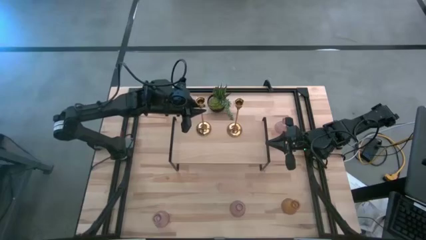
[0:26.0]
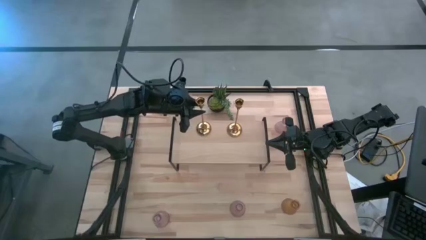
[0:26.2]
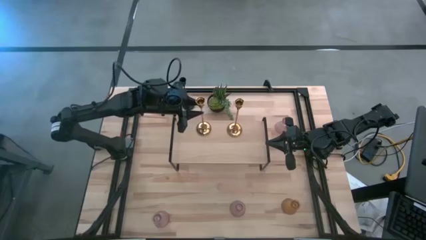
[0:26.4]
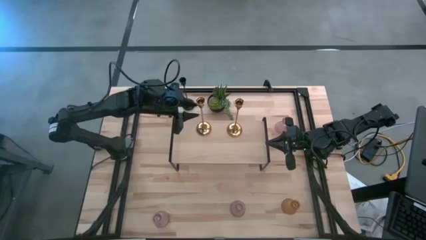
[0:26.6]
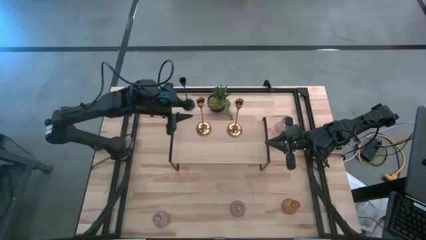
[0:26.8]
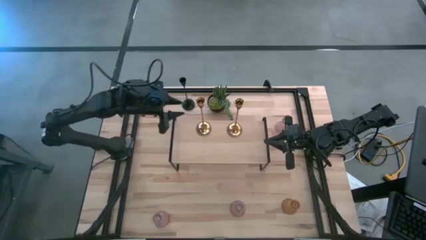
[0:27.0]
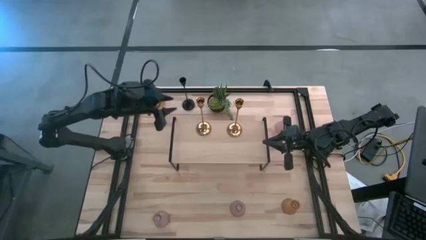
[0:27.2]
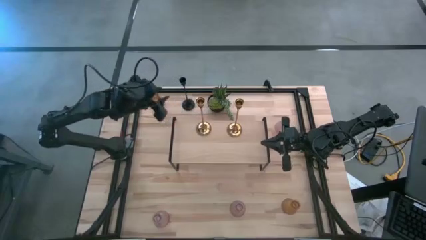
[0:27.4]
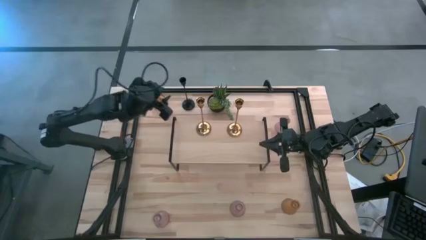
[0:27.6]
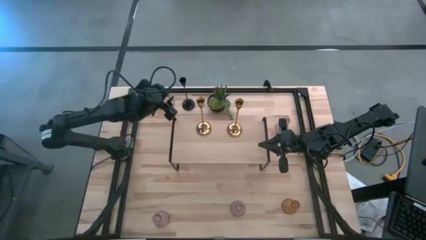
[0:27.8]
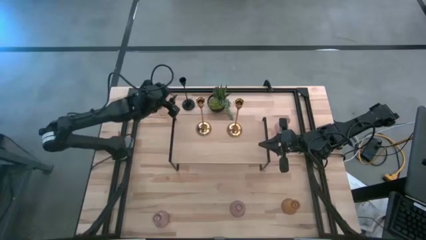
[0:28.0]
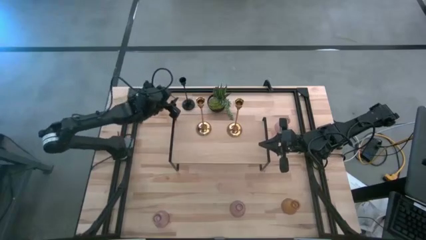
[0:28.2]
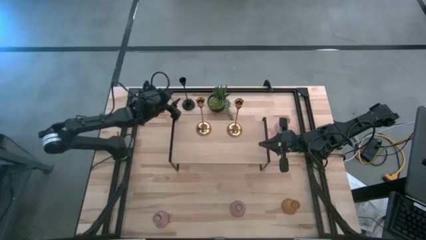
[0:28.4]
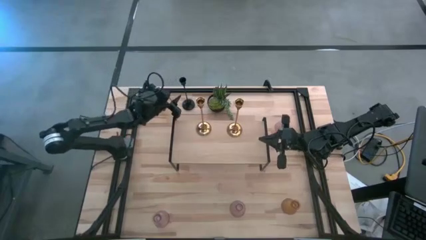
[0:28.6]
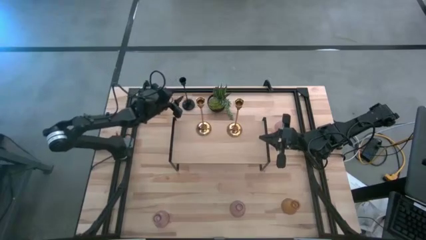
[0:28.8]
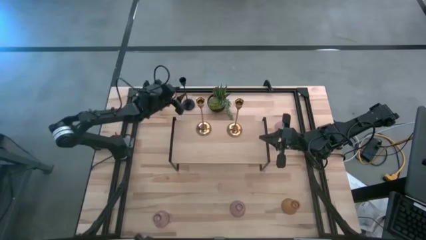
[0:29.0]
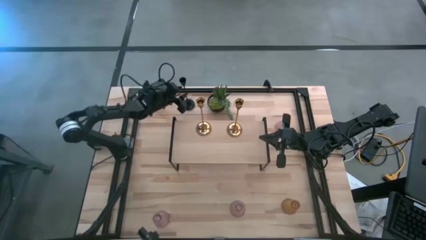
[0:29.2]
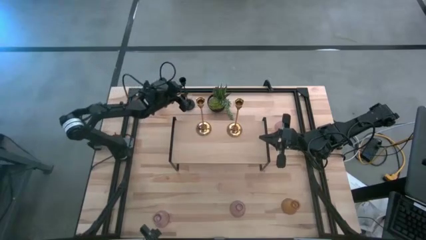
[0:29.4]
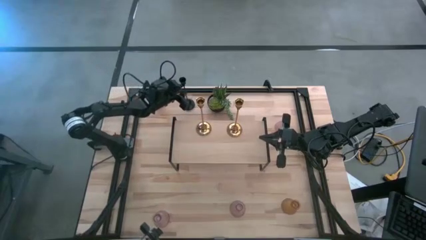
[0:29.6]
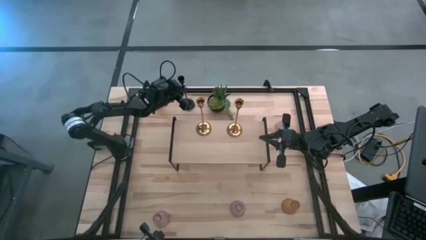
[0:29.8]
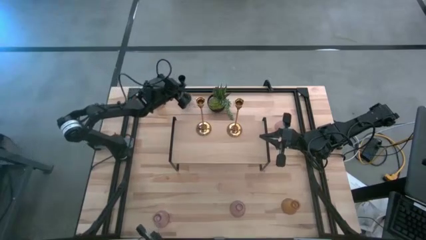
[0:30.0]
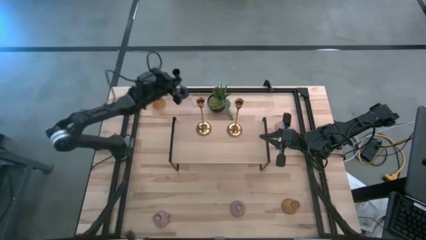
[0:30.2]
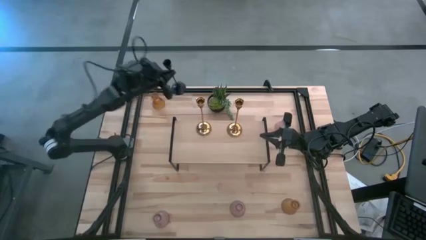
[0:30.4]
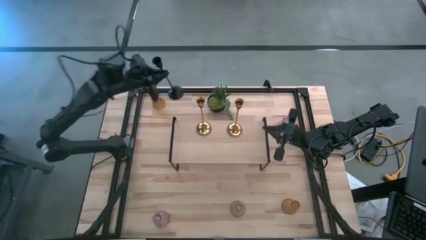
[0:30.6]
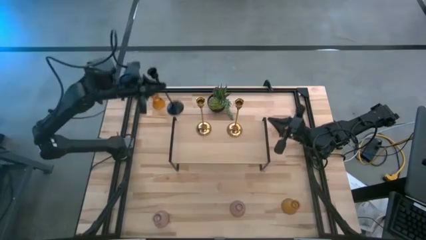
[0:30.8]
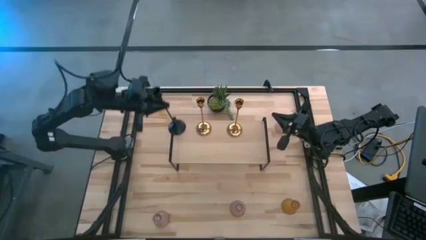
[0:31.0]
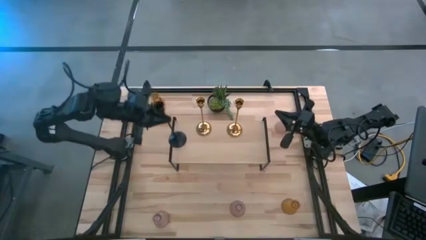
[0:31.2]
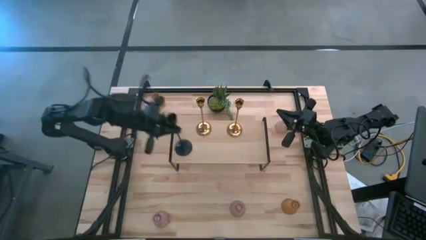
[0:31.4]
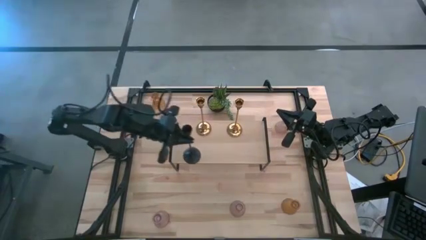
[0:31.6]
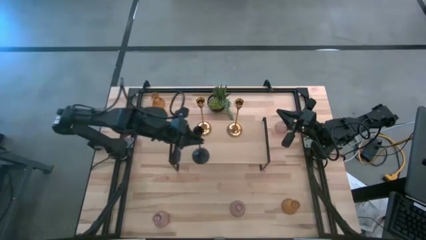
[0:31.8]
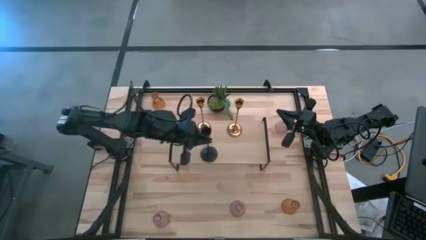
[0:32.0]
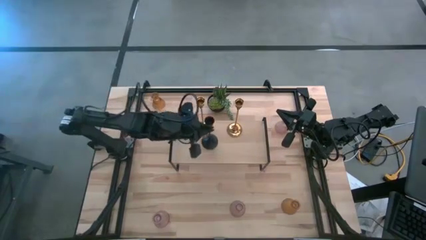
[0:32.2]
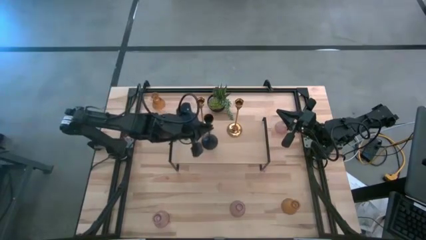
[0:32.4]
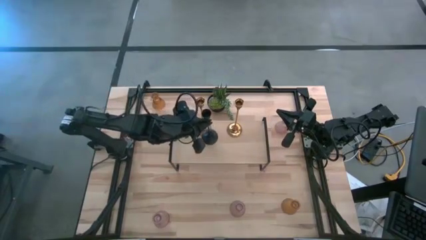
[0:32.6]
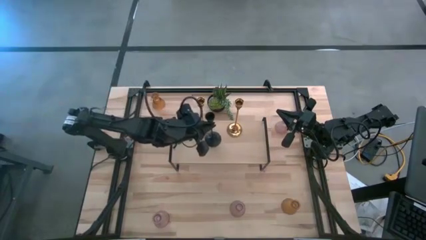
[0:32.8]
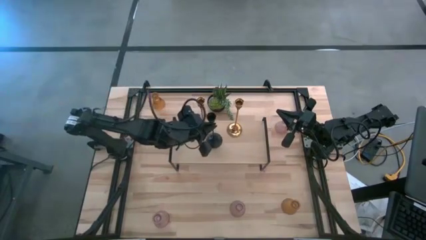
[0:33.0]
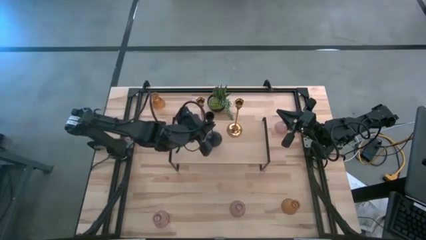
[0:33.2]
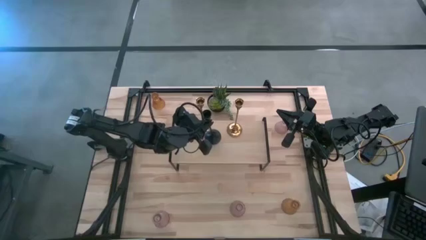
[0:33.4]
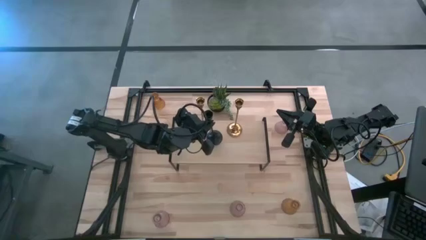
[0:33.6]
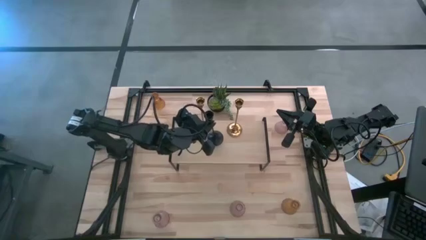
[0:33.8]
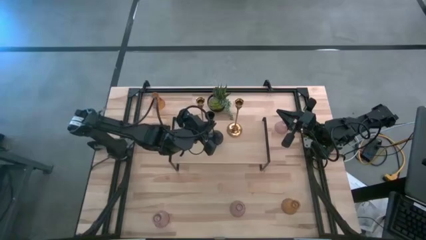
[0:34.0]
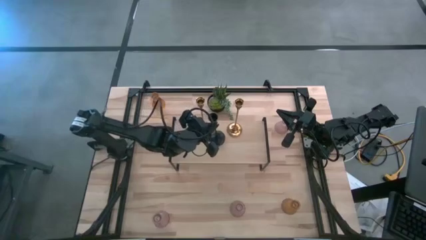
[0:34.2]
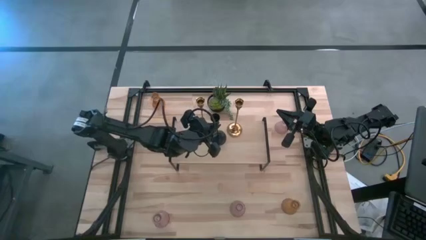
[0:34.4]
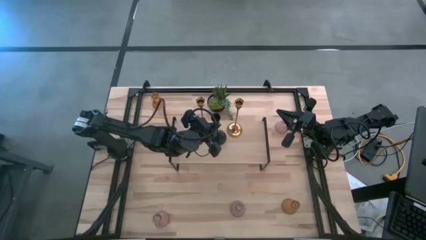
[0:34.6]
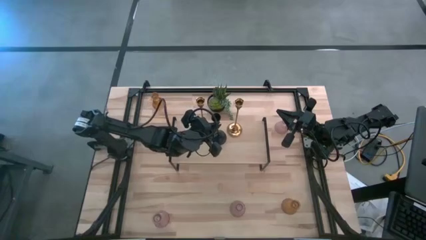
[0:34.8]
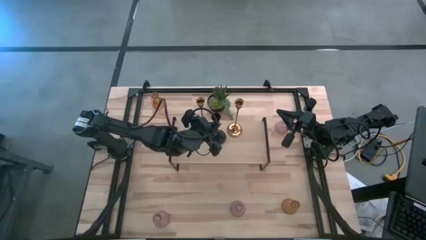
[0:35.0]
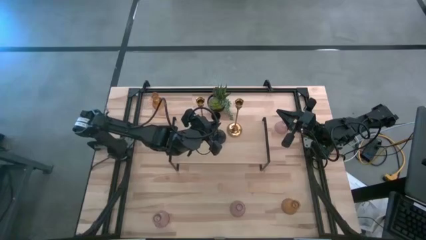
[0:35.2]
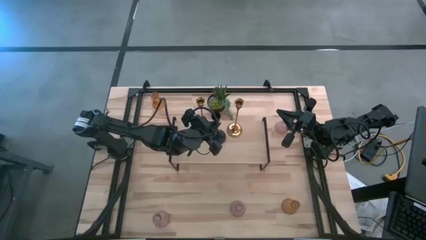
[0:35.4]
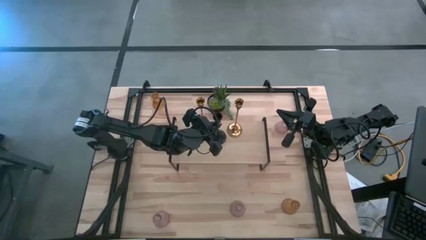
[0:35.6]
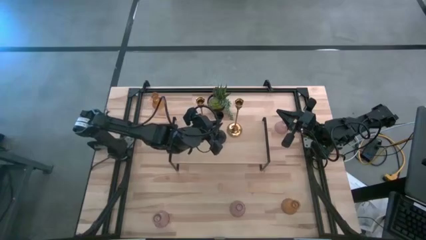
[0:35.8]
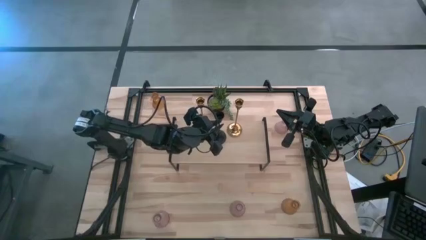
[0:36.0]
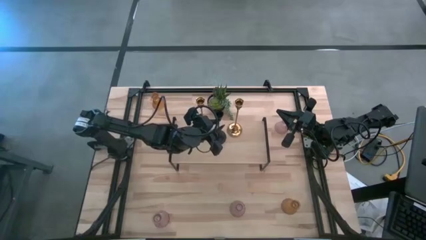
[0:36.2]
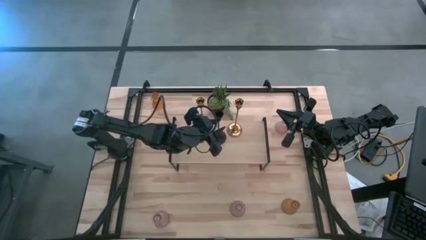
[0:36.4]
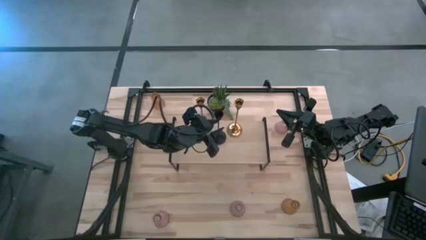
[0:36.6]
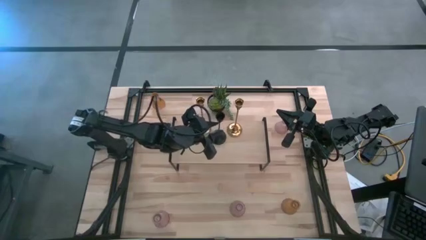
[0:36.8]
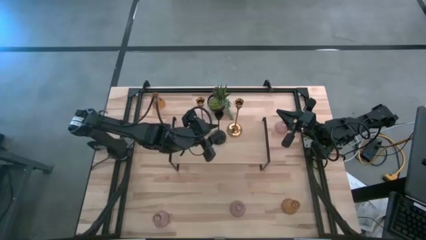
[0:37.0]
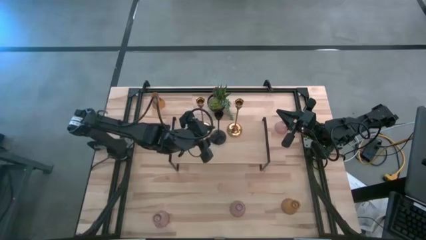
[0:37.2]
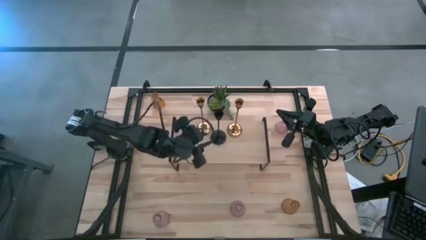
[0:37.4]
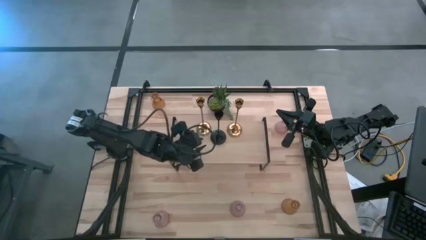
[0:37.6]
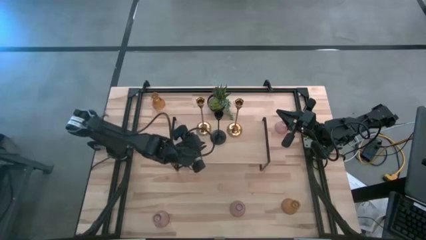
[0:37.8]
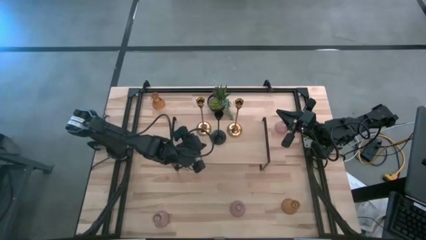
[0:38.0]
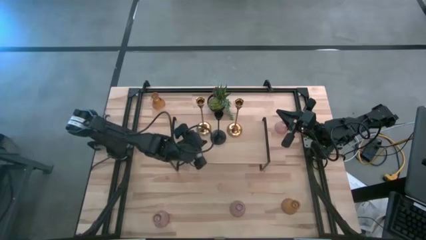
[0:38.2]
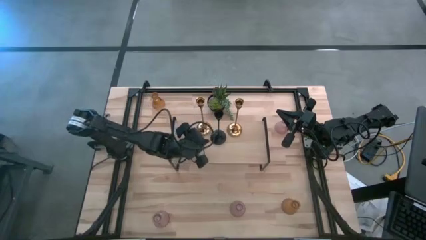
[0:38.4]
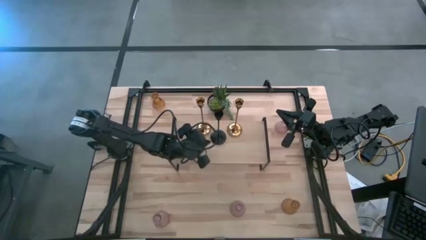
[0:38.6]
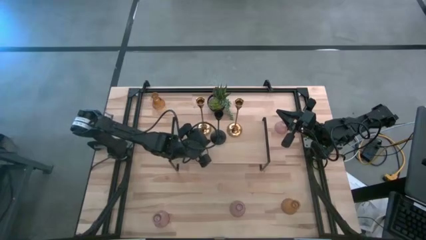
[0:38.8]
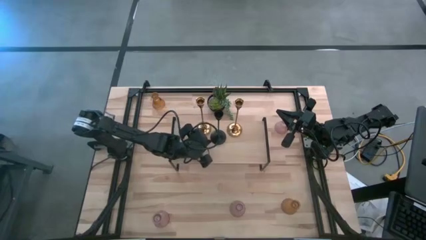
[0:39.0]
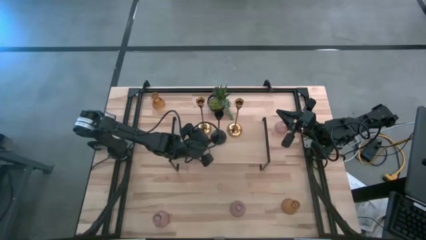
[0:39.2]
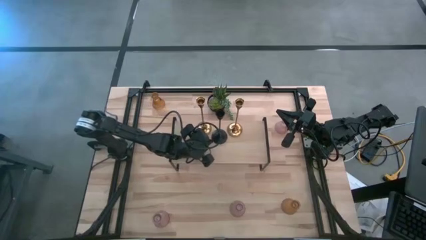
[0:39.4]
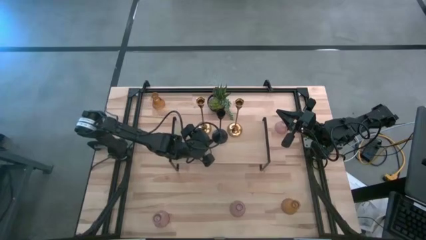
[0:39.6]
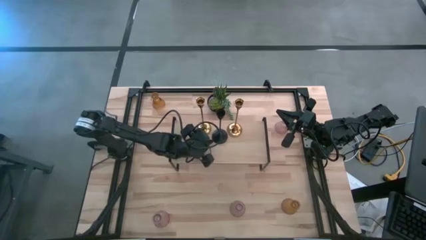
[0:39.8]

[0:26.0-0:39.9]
Task: Pick & Place candle stick holders
Put the black candle holder on the shelf

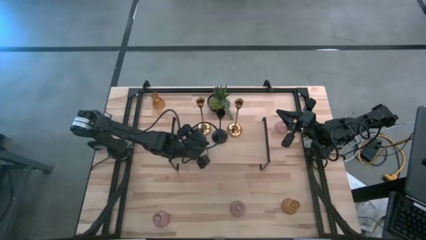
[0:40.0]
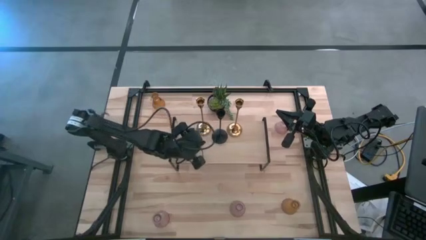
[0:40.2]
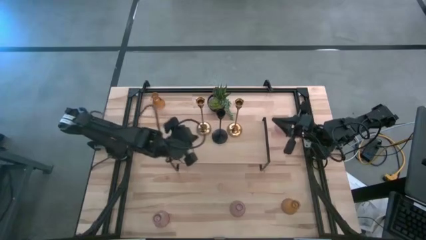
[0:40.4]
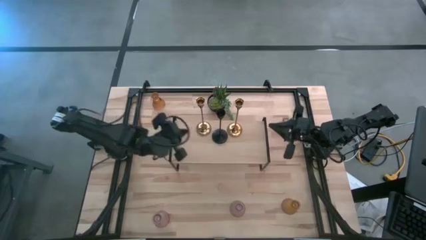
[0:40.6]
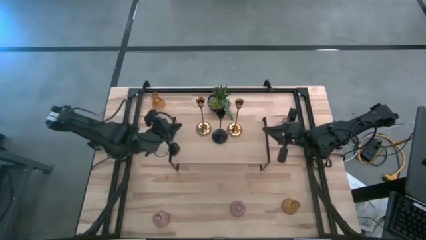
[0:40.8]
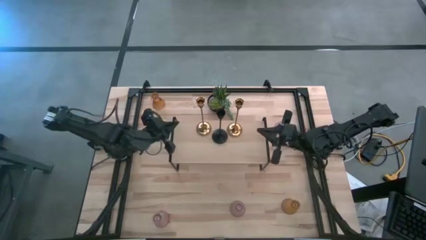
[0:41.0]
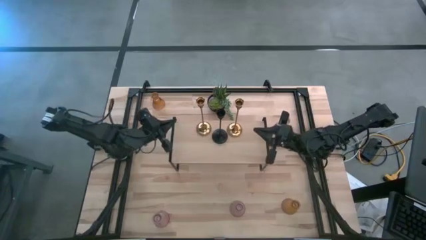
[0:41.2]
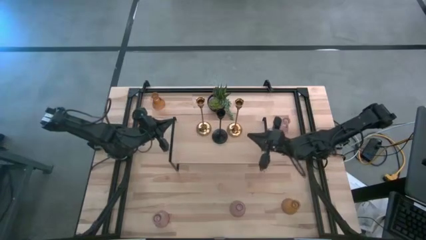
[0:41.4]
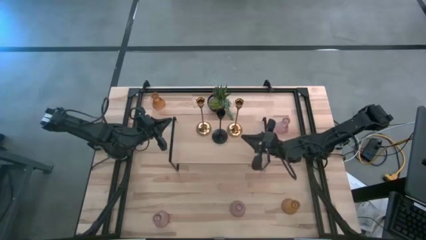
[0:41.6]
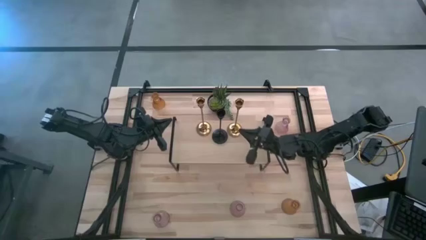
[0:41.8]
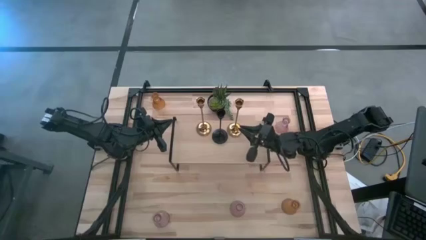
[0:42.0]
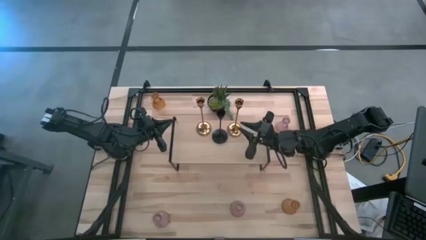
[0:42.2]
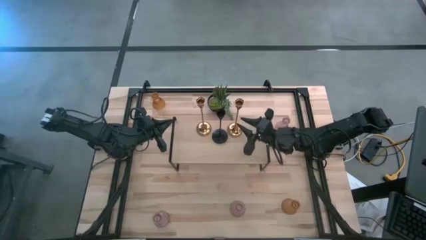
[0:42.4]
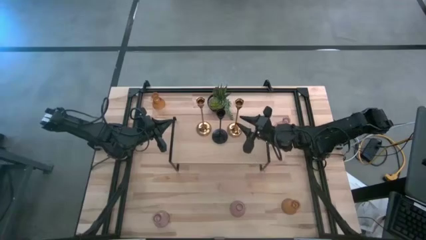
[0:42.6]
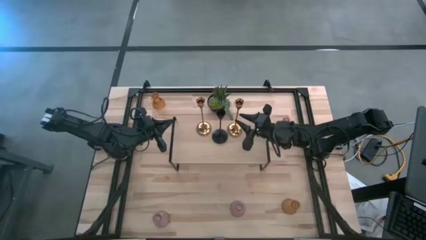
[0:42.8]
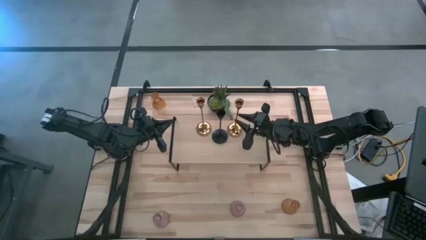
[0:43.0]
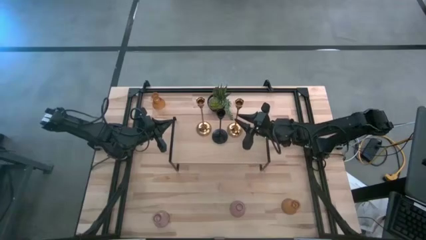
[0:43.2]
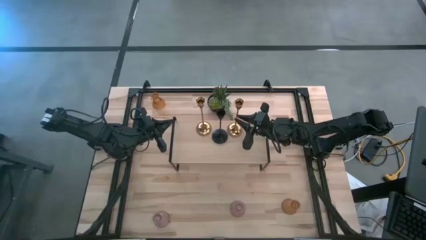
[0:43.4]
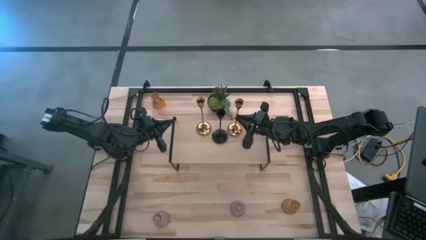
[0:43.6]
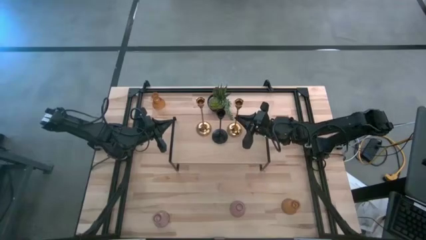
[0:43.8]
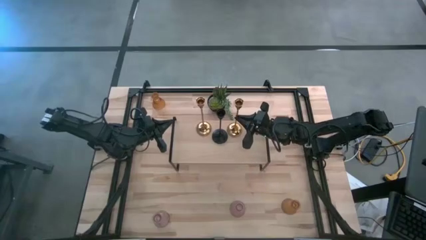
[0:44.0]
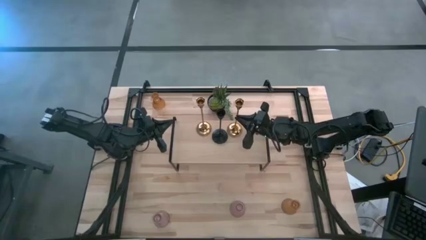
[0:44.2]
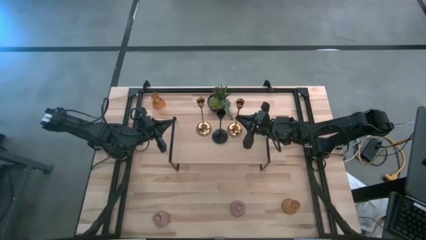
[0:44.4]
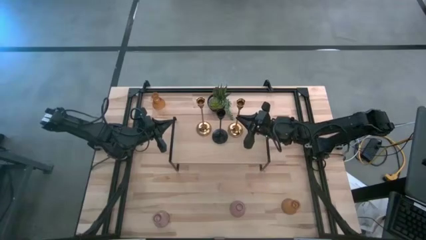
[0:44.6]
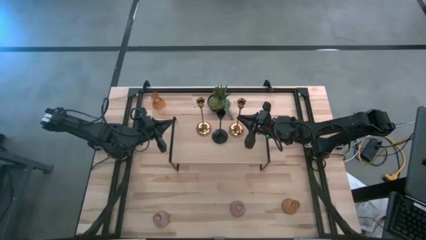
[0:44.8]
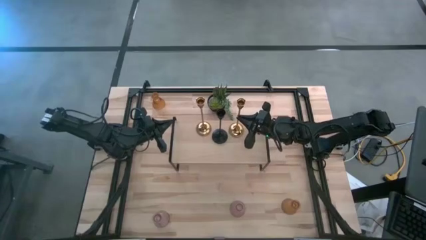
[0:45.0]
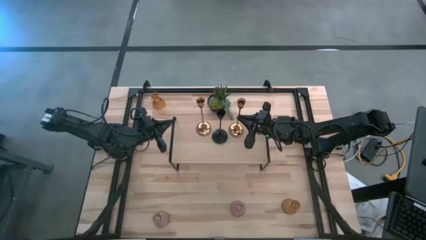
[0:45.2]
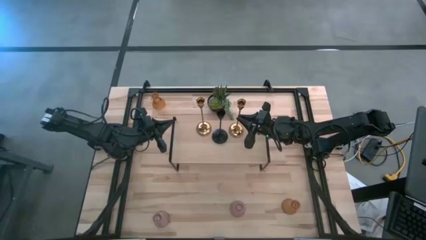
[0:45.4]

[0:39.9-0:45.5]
Adjust the gold candle holder on the shelf
